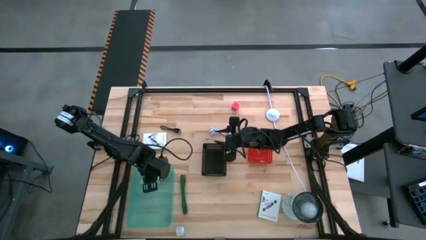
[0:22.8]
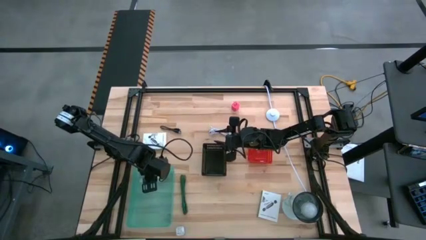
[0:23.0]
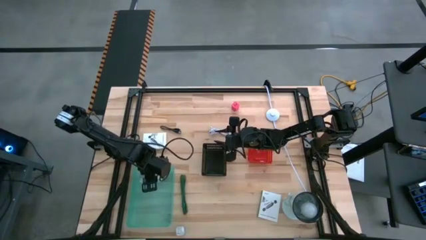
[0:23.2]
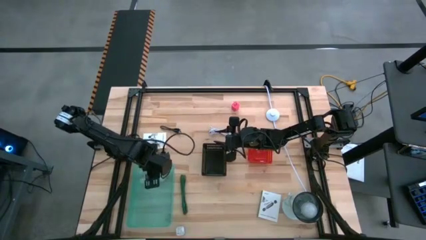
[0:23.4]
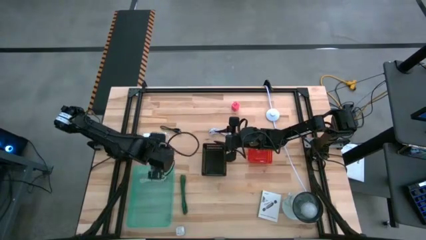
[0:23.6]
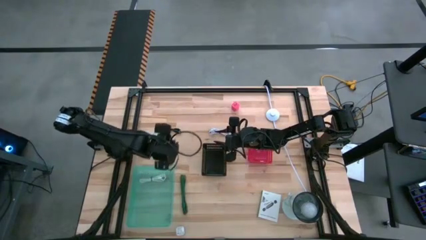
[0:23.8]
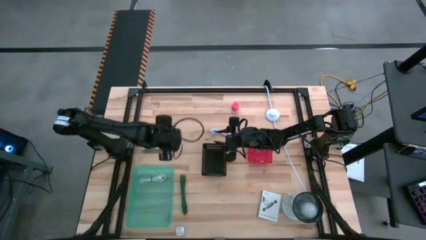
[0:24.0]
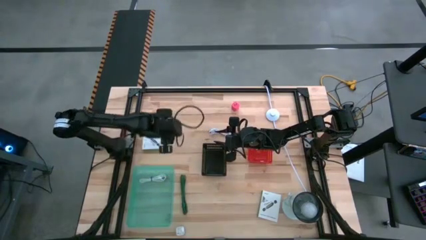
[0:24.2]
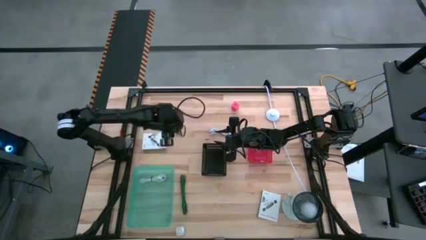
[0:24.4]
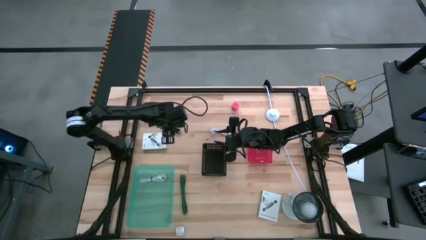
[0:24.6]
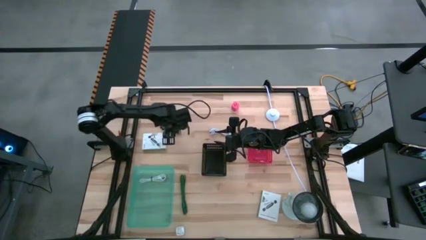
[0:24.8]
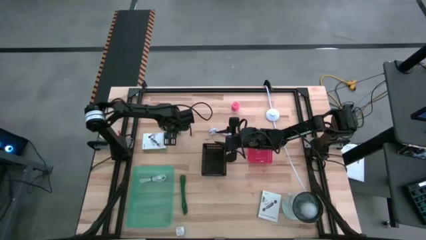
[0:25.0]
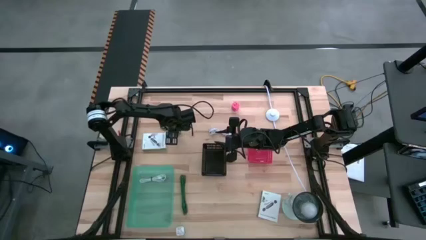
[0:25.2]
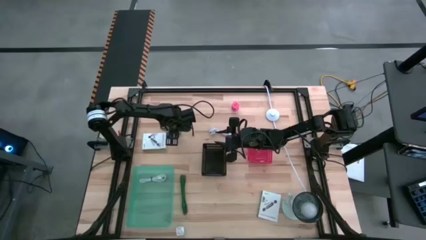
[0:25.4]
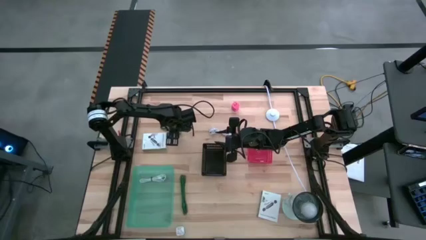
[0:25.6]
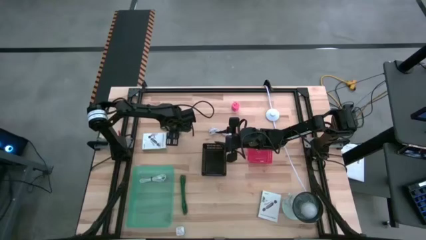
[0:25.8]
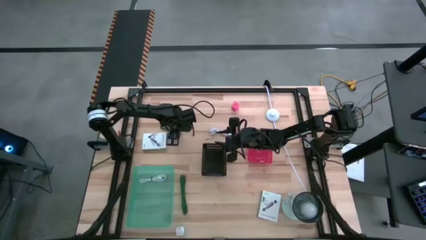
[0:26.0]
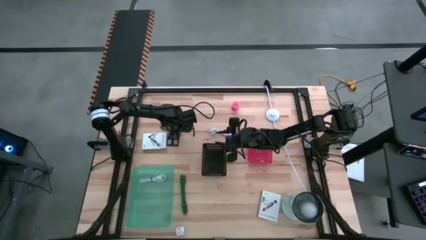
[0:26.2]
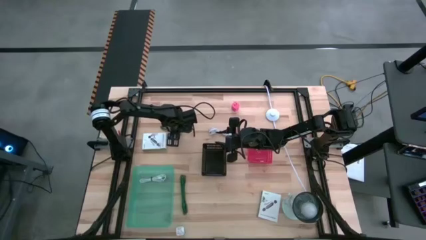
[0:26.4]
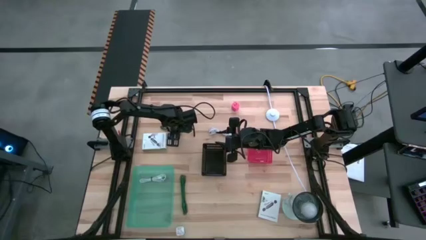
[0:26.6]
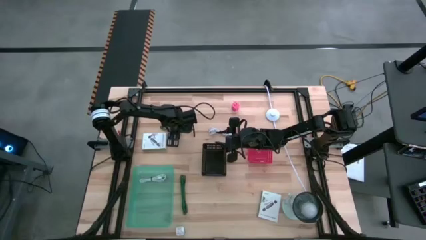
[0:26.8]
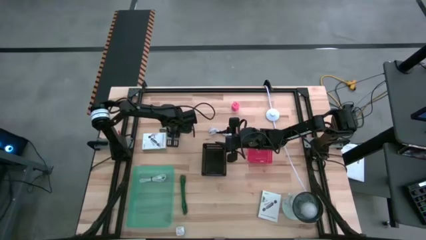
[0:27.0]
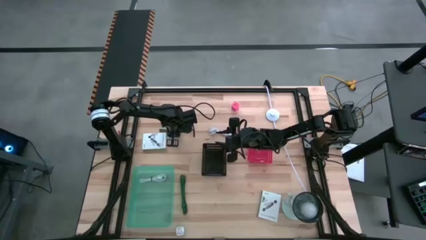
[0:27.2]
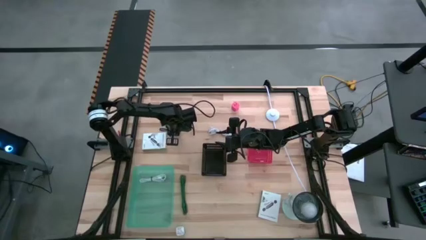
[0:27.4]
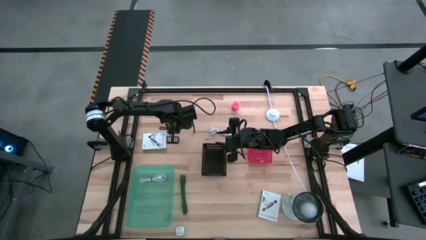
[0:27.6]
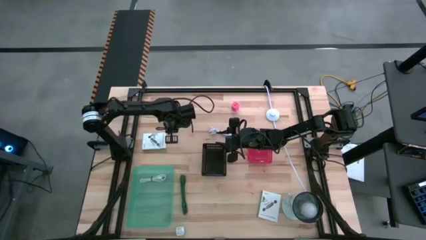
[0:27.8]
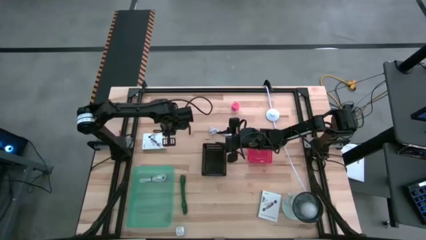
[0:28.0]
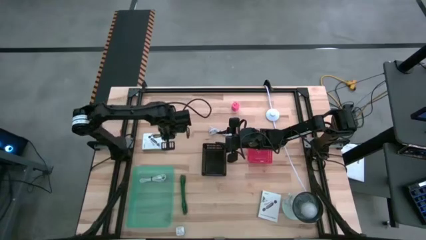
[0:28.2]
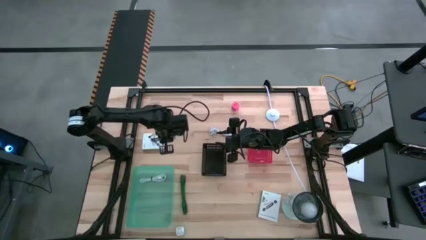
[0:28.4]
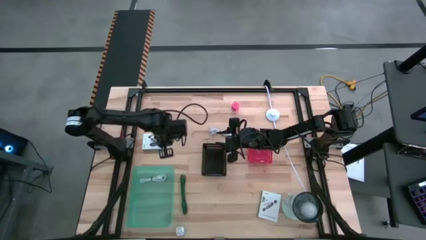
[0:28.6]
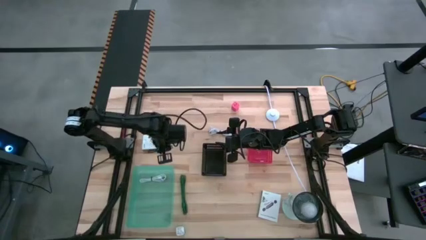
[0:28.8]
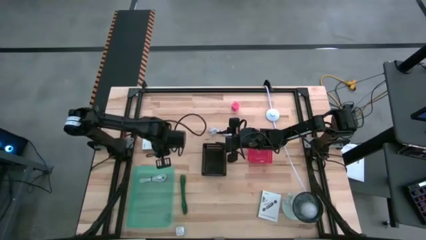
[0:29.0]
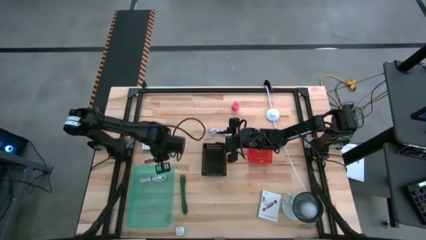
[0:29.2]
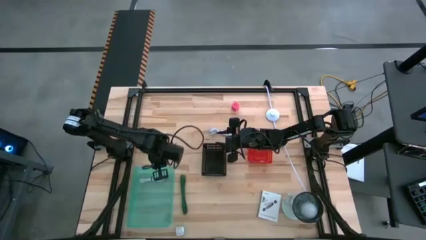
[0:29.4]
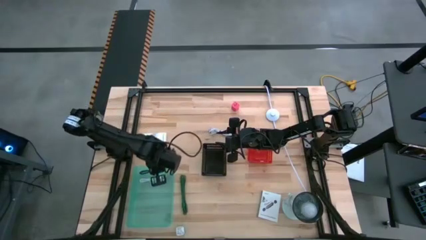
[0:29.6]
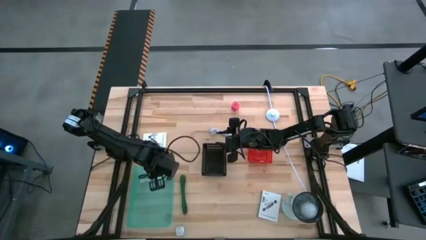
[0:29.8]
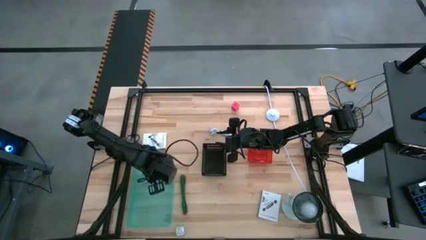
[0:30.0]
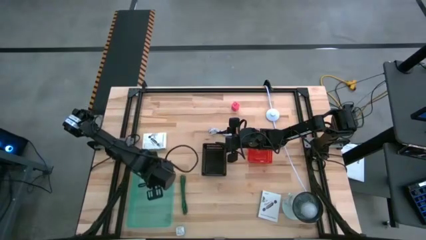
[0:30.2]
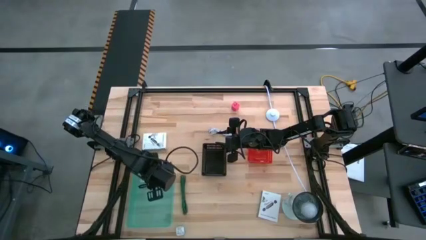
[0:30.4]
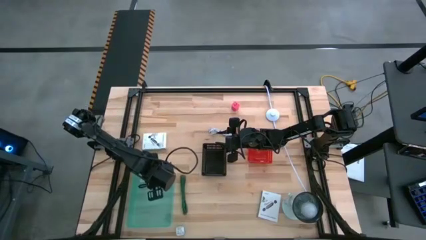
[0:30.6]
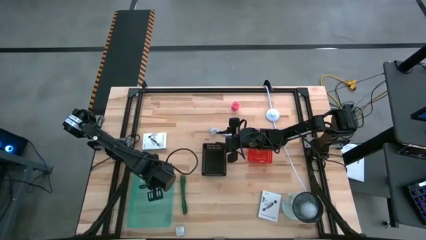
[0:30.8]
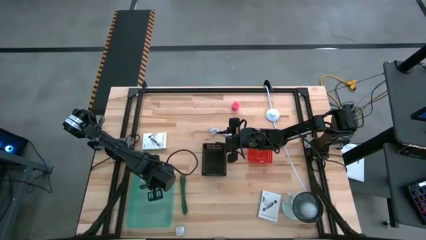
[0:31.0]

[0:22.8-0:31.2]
Task: Pick and place items into bin
Put the black charger cable into the green bin

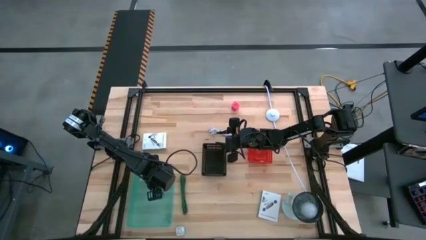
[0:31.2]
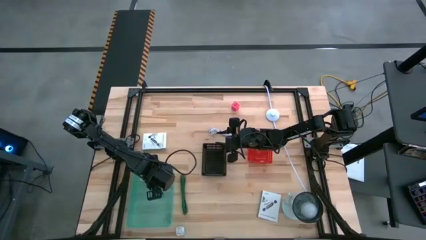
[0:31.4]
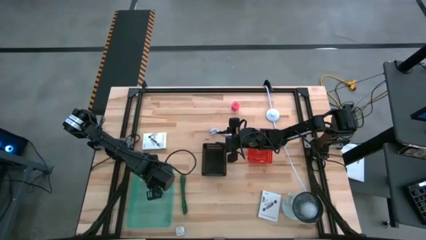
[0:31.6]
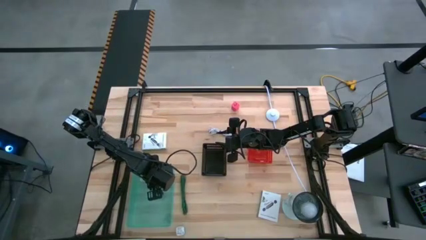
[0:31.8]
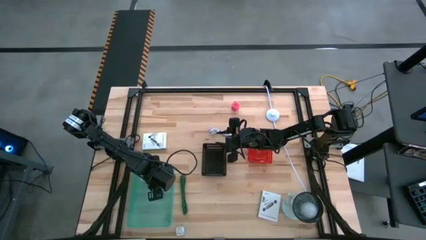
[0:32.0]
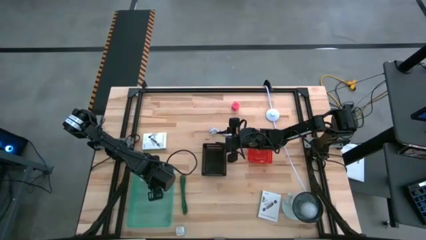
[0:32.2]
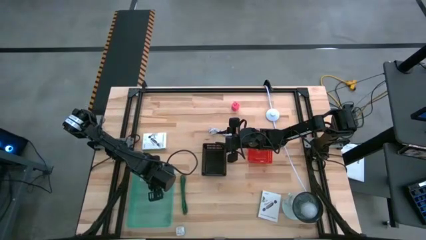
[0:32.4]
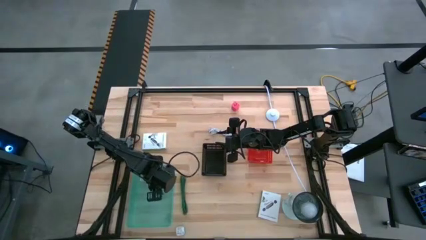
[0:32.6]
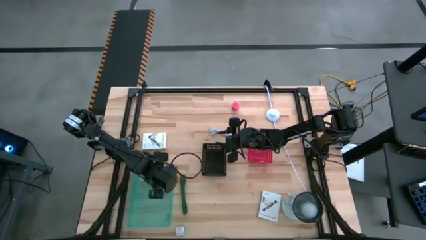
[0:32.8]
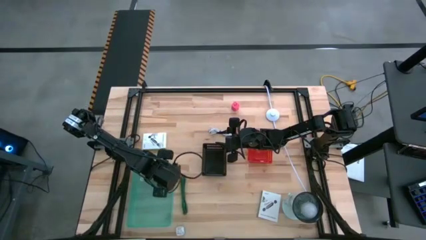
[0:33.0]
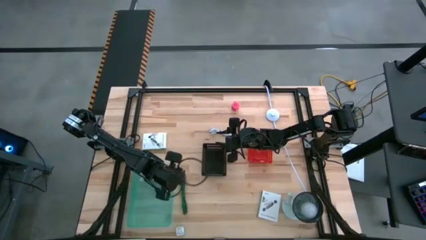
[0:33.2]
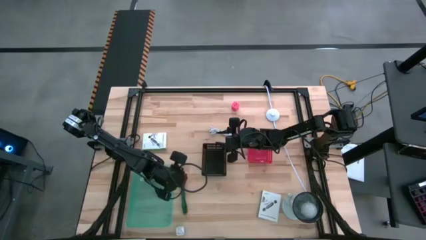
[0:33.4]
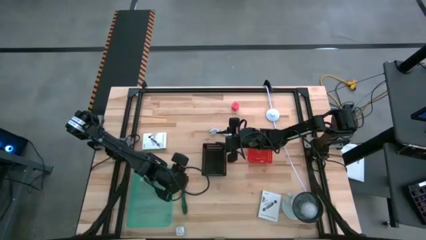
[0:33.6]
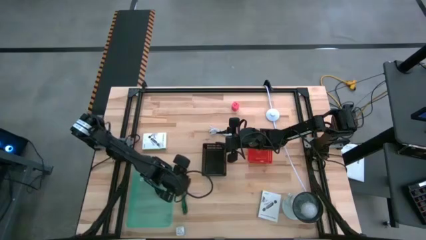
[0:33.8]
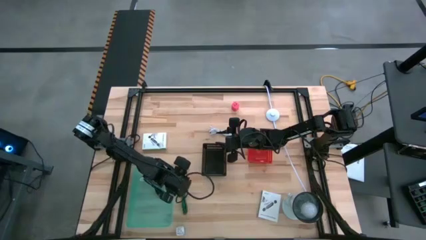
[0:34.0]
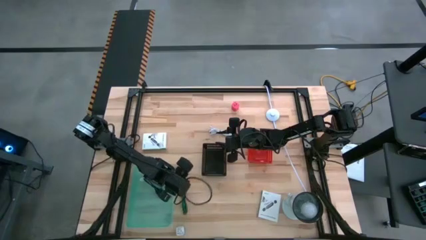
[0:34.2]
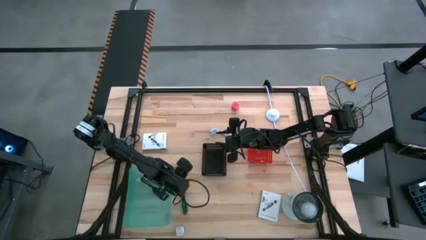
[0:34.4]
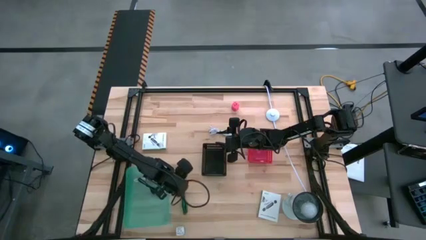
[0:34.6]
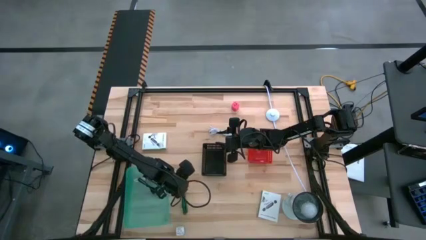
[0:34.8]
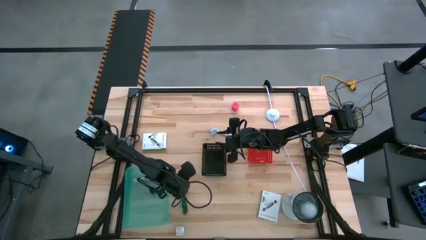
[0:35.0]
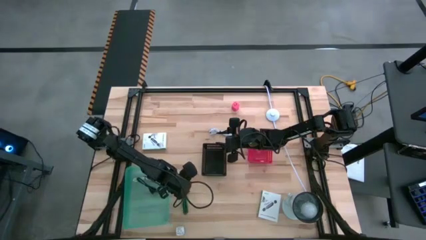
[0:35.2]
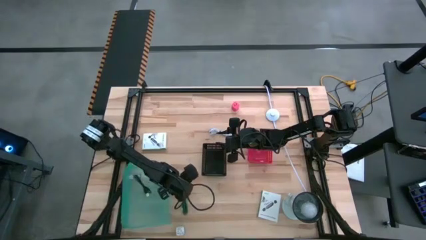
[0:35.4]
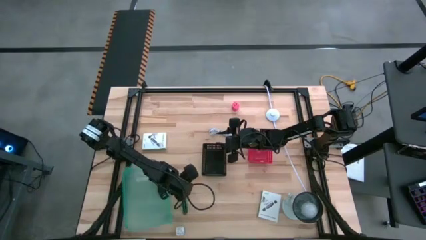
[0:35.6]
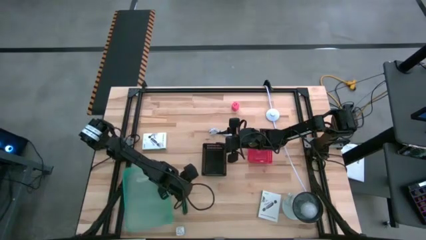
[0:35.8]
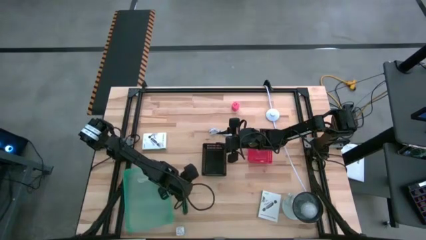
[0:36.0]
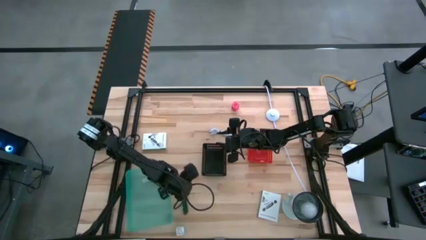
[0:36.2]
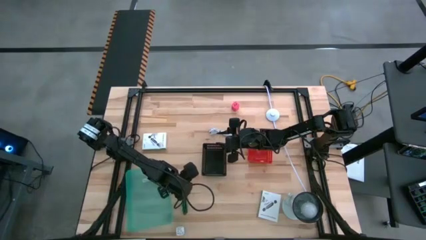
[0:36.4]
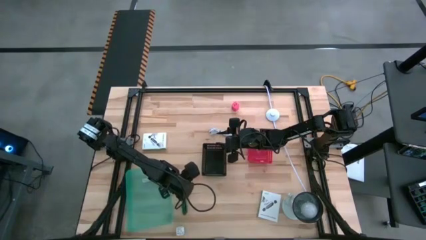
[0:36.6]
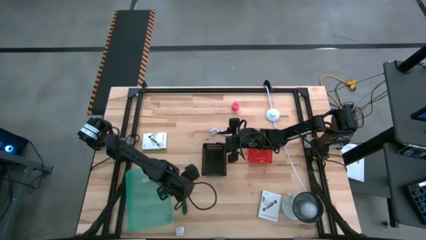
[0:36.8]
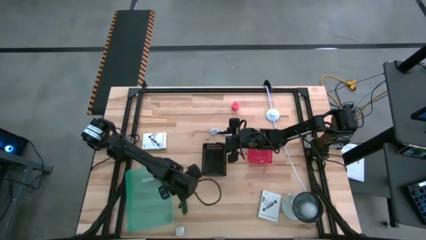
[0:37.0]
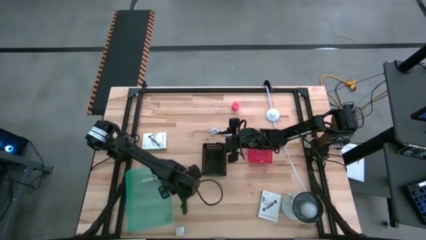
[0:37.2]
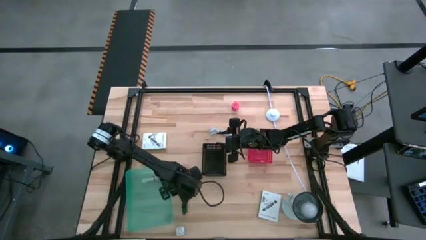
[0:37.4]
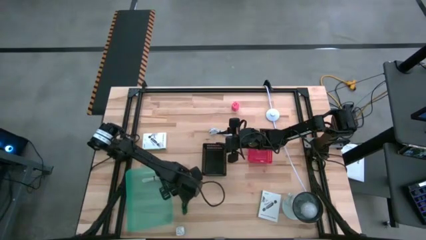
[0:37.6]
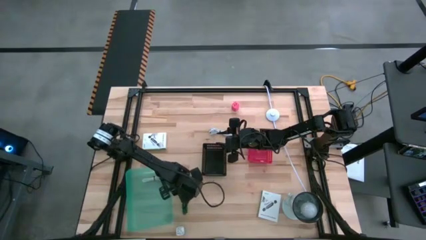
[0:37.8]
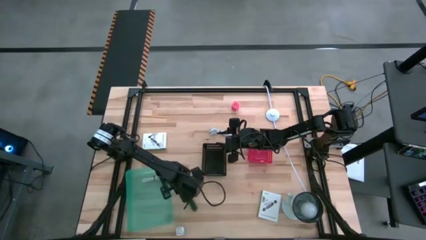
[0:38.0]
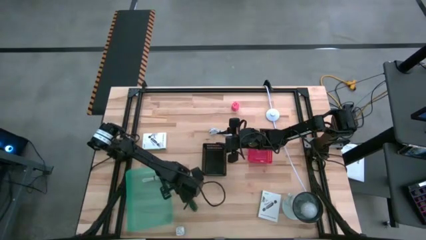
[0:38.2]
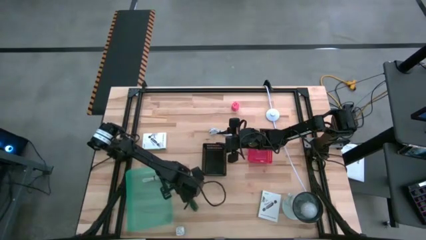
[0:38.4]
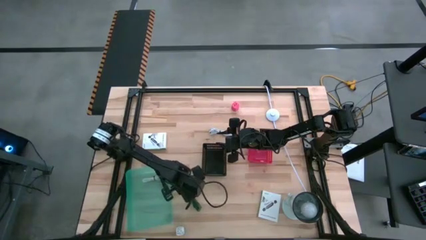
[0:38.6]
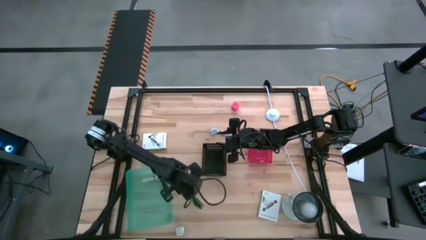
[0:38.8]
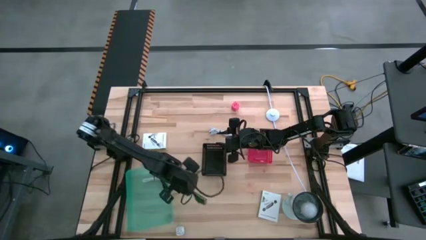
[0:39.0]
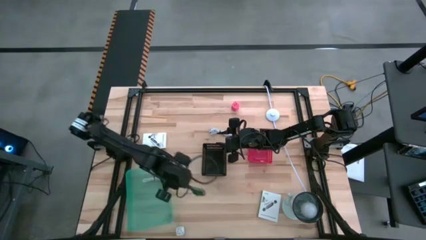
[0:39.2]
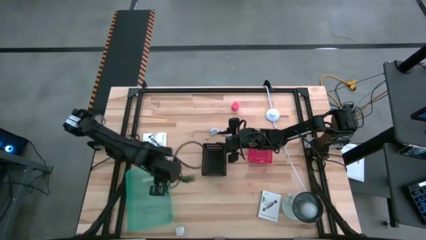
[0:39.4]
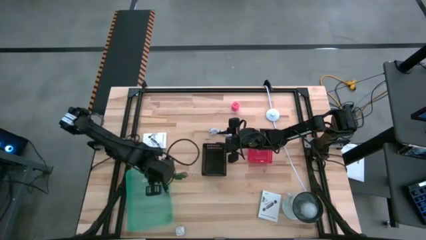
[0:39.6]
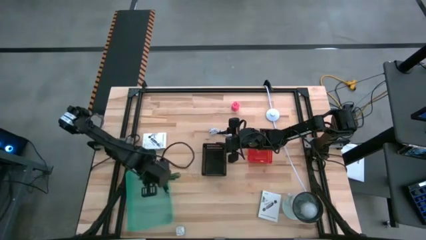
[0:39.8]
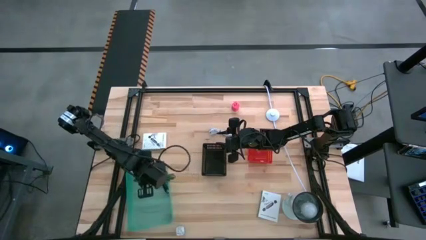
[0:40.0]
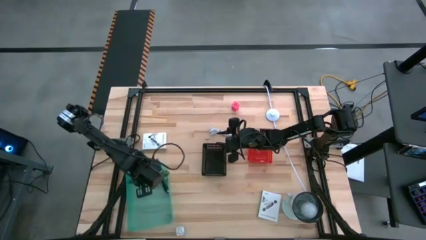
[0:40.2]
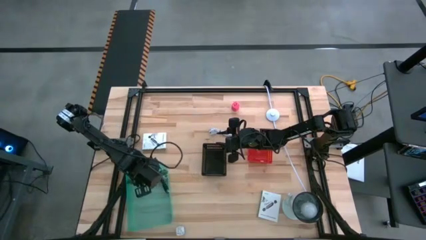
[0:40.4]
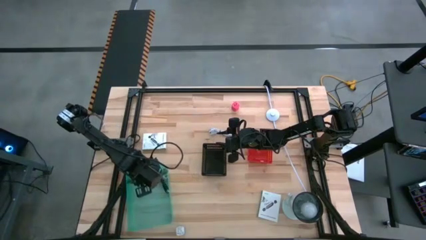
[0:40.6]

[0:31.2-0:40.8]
Put the green charger cable into the green bin
